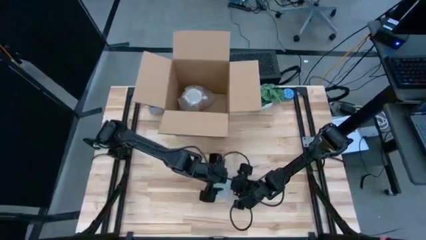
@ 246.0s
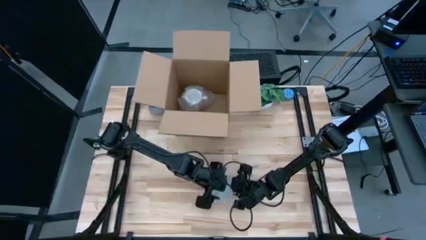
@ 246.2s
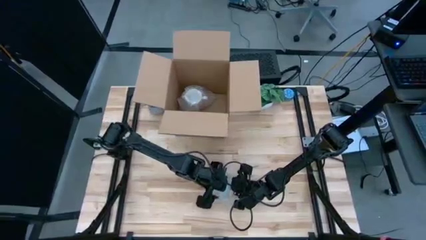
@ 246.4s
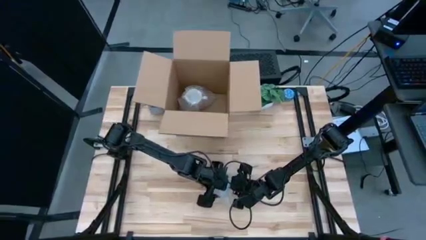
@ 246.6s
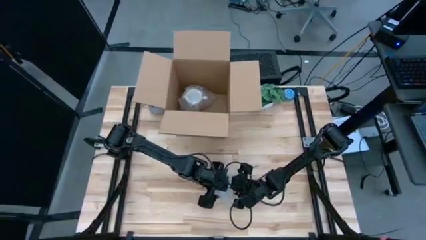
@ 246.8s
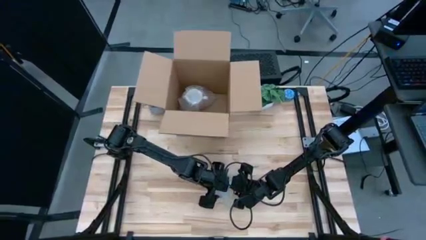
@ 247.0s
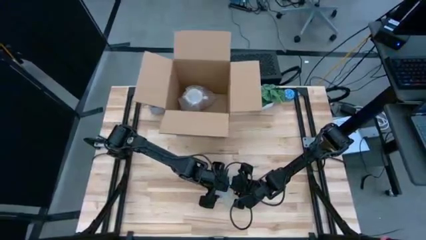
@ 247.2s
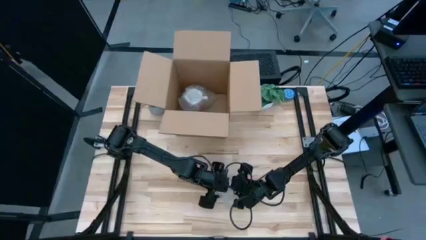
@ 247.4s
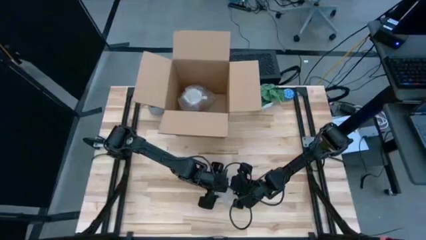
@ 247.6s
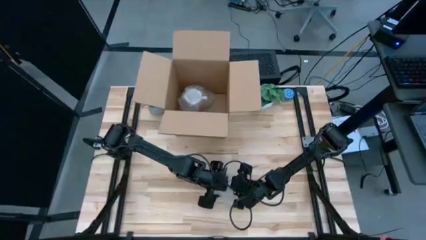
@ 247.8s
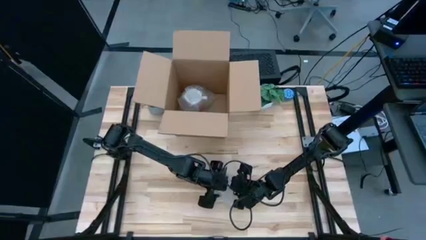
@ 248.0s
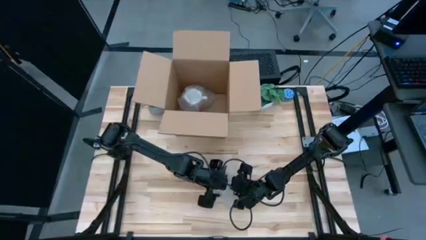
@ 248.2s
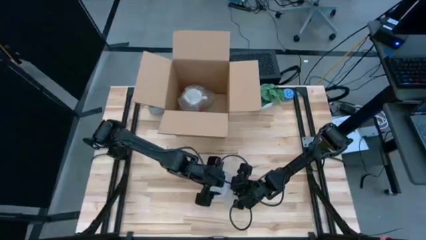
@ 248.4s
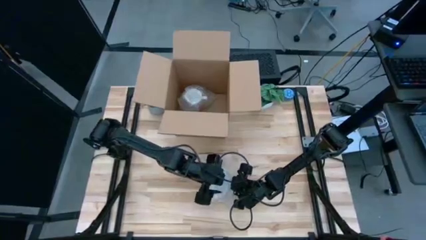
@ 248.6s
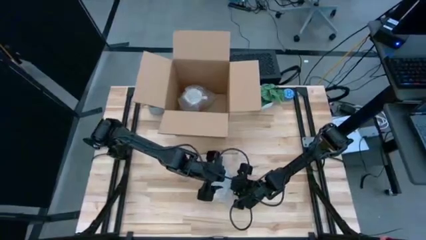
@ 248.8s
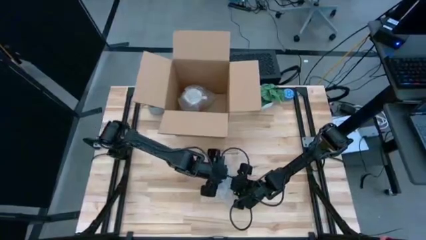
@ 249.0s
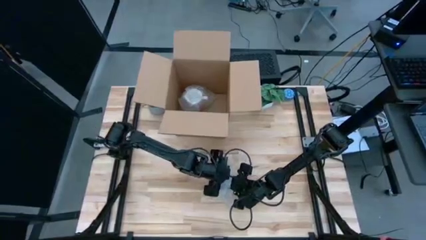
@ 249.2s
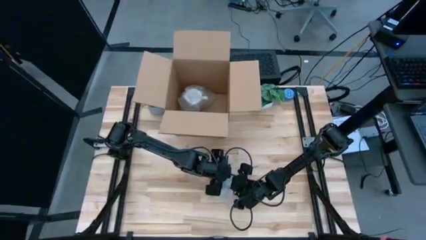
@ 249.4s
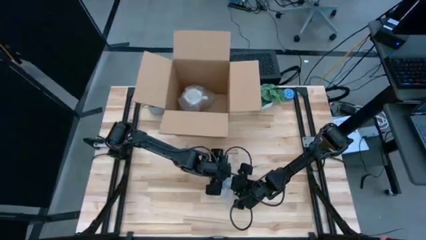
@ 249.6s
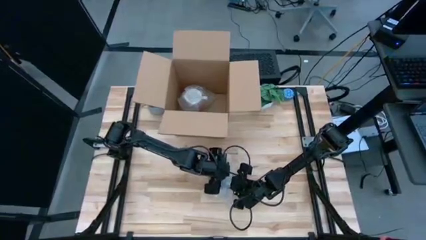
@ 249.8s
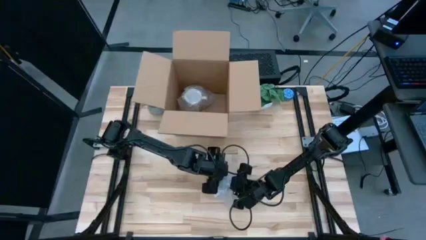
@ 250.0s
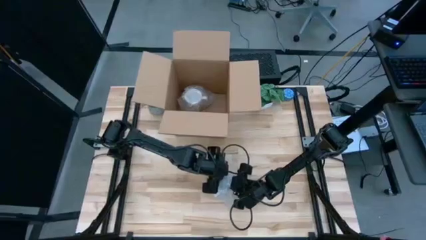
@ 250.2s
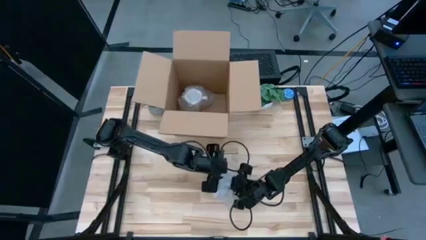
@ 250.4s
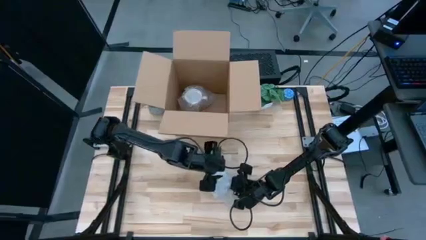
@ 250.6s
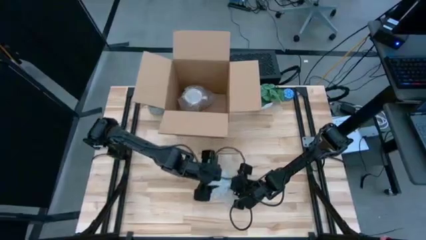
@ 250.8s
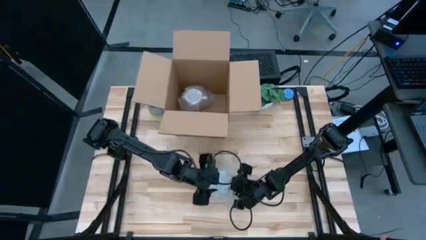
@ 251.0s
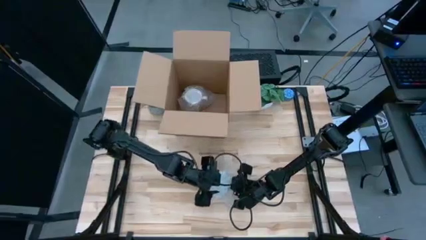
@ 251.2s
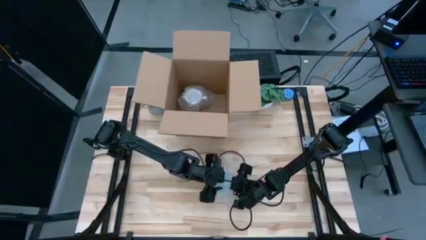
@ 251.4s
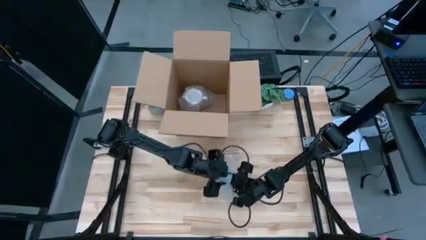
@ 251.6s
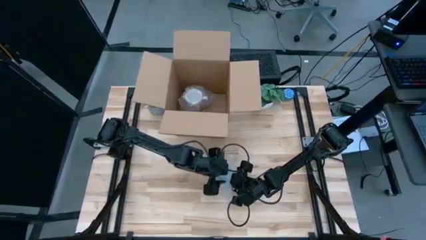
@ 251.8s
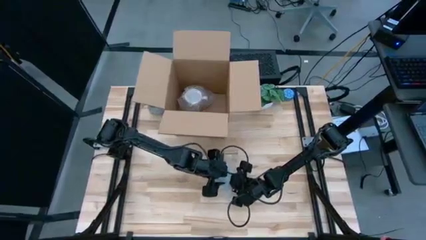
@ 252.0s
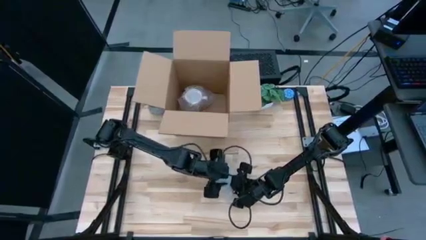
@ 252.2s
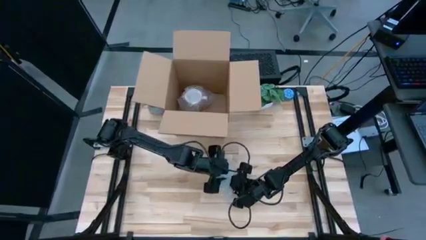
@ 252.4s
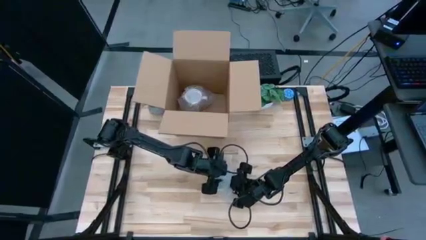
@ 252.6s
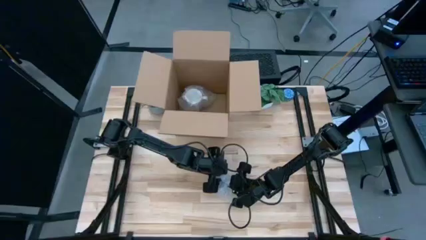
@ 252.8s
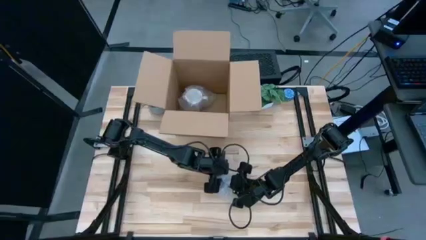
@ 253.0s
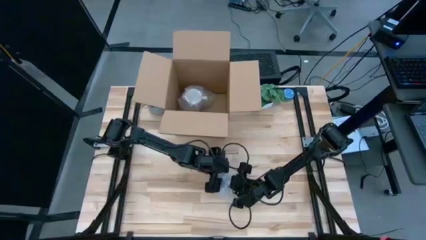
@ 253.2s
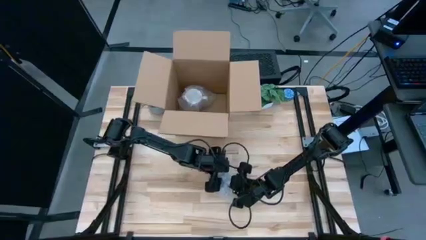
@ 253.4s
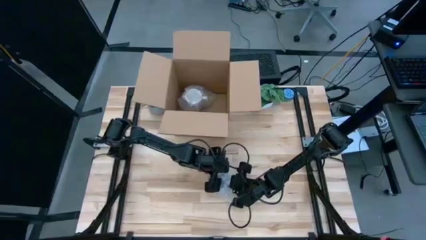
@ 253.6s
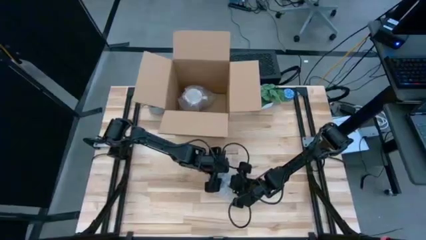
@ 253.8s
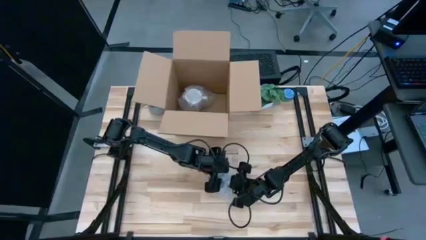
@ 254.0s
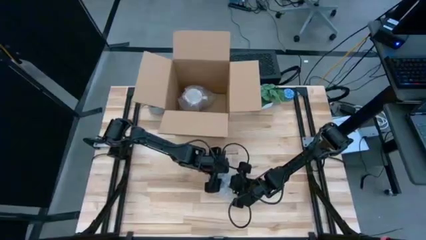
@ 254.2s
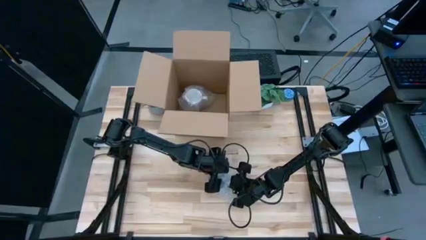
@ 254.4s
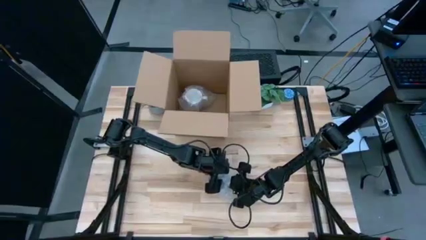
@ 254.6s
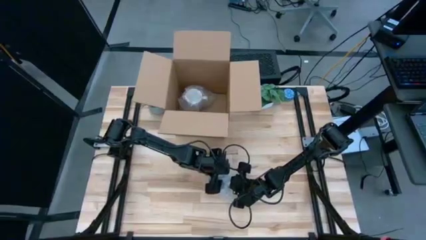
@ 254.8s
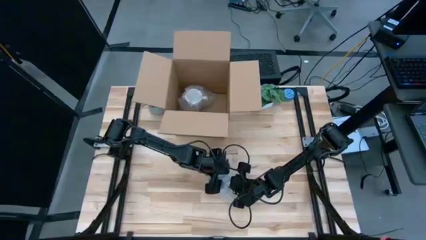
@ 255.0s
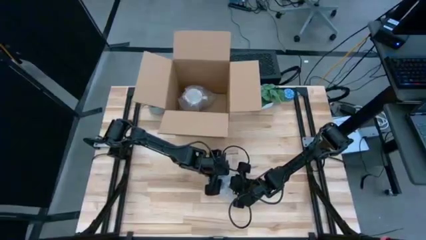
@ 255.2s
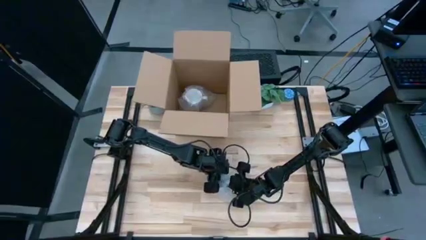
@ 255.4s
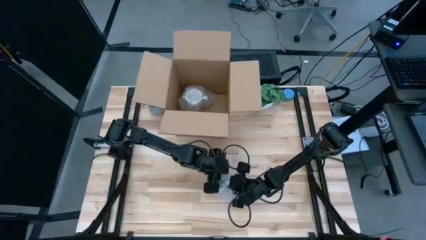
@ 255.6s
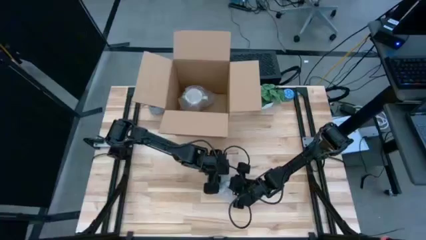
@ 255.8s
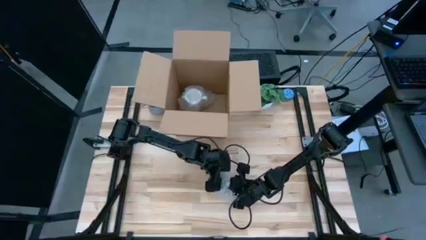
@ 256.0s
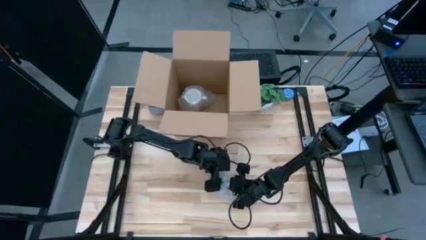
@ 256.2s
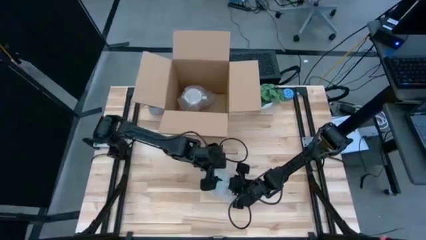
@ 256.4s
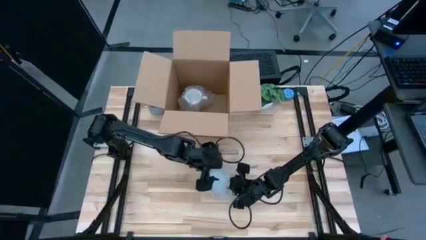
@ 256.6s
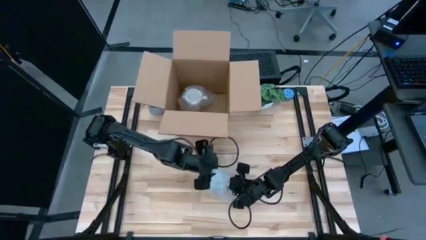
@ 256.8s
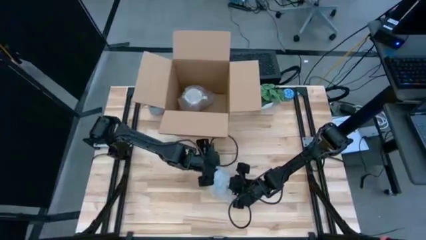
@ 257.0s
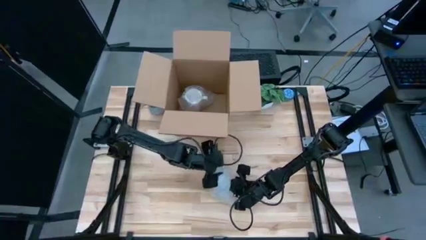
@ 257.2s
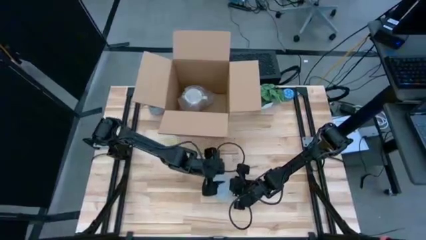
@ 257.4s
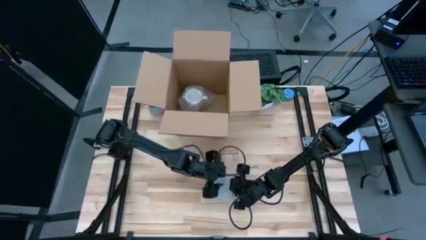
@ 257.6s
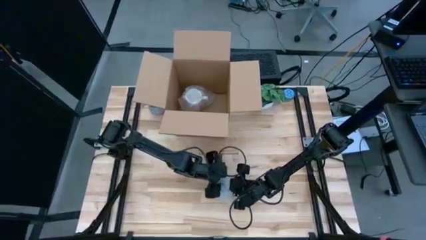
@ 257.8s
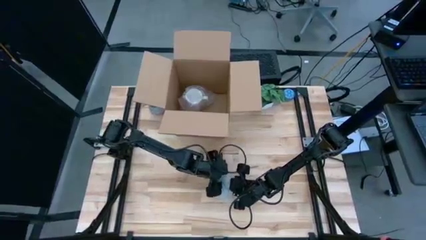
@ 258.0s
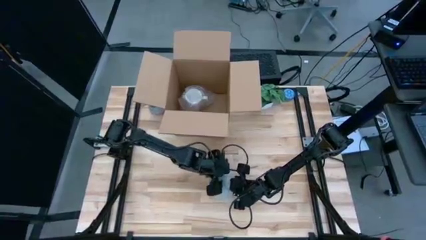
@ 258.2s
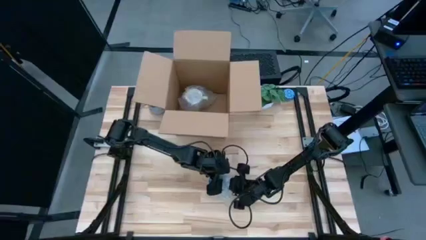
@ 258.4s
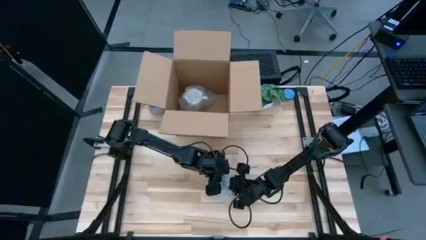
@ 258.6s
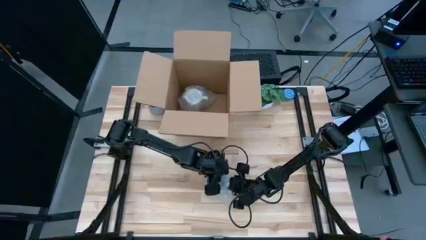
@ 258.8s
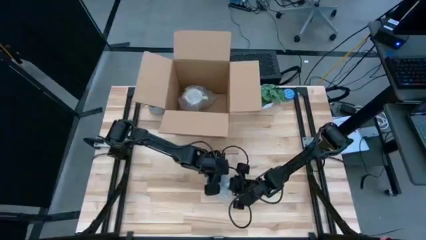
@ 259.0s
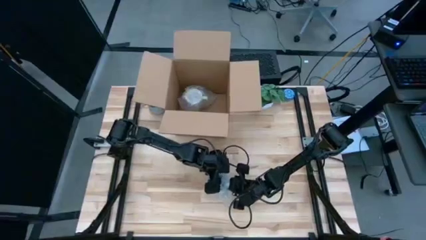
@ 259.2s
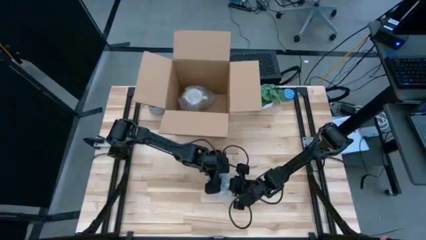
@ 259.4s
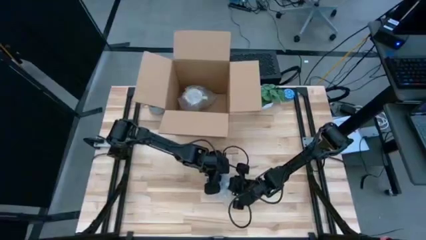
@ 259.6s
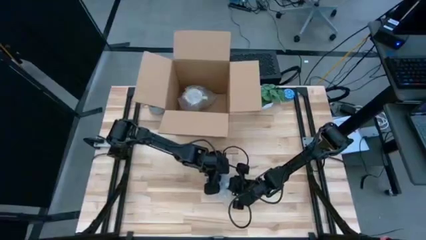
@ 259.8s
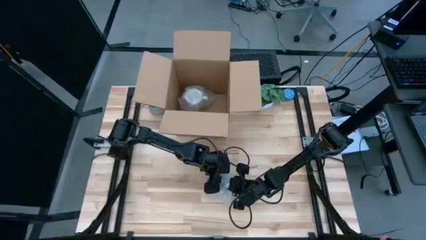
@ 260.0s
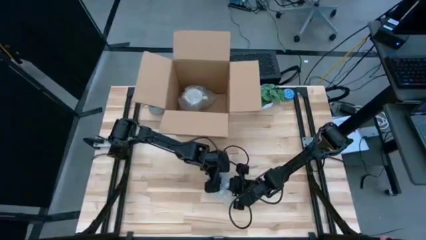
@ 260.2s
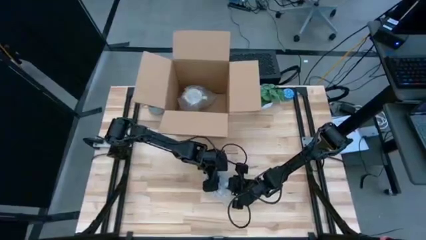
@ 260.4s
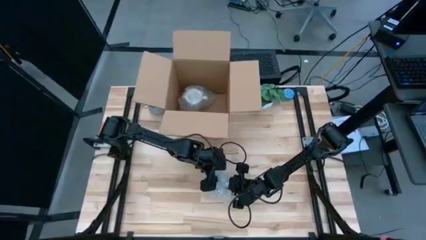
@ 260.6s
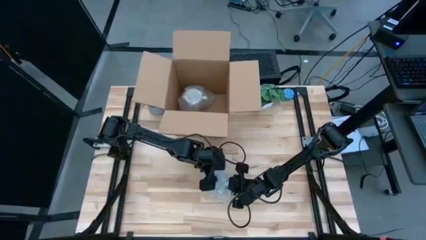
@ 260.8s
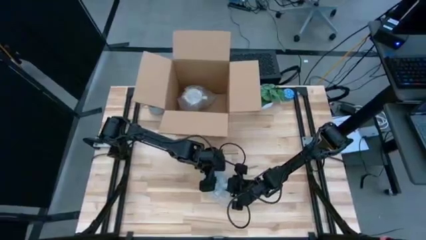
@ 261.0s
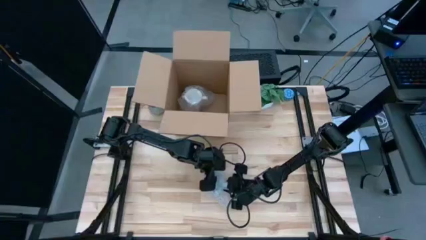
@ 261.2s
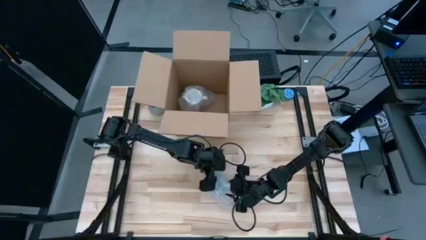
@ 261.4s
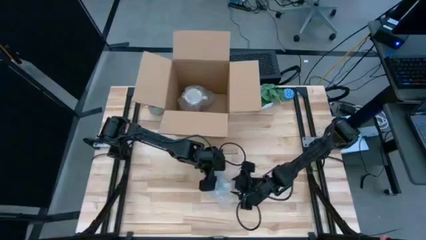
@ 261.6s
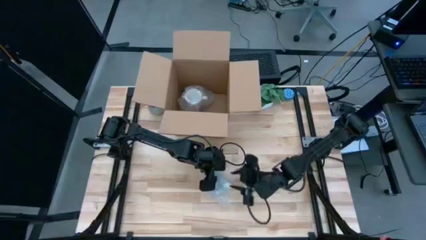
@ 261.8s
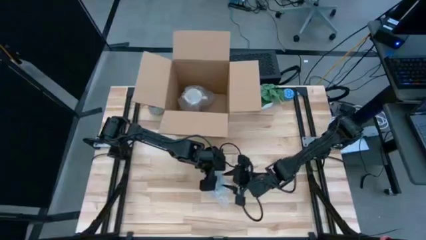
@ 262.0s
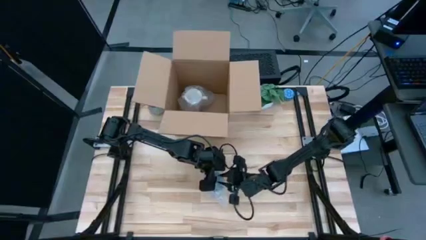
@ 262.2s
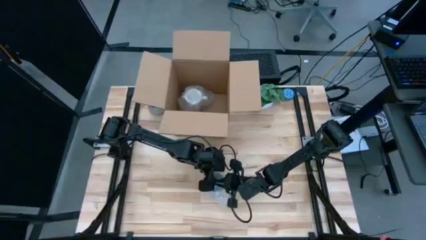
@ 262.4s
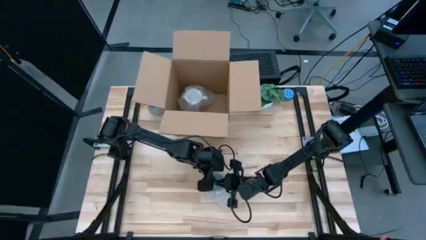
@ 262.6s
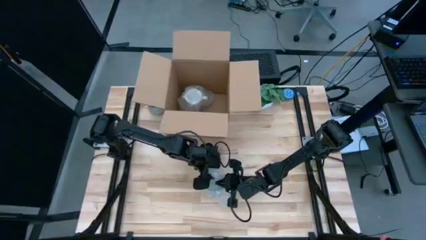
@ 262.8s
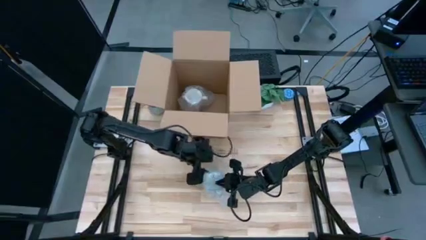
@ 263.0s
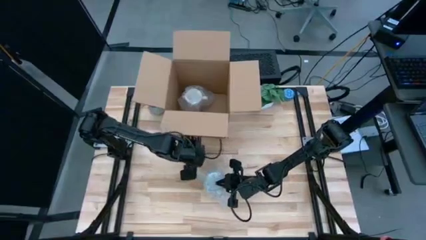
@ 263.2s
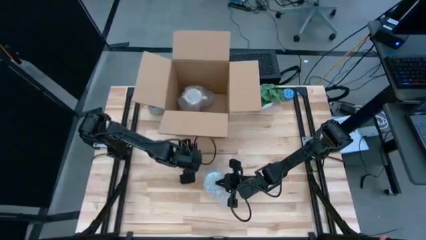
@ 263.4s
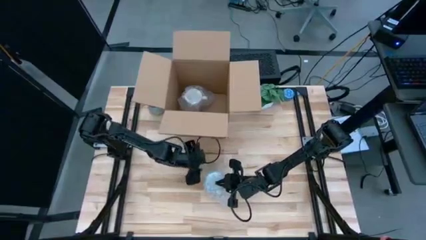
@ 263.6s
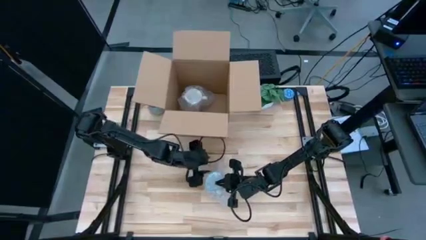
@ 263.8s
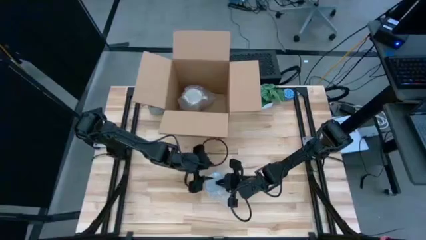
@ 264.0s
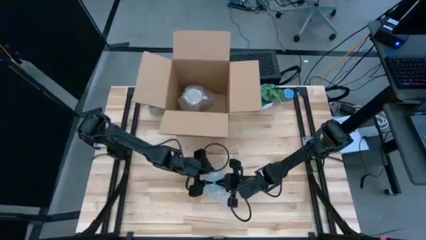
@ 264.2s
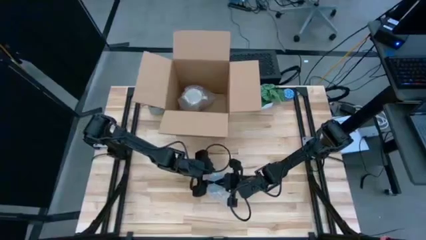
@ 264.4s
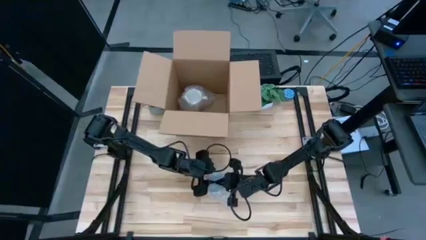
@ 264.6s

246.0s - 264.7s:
Task: wrap mug
Wrap the red mug with bubble wrap
